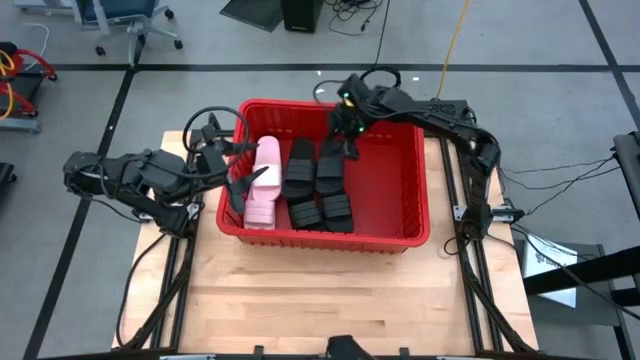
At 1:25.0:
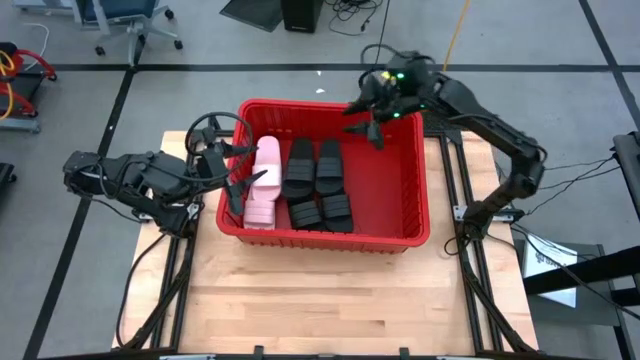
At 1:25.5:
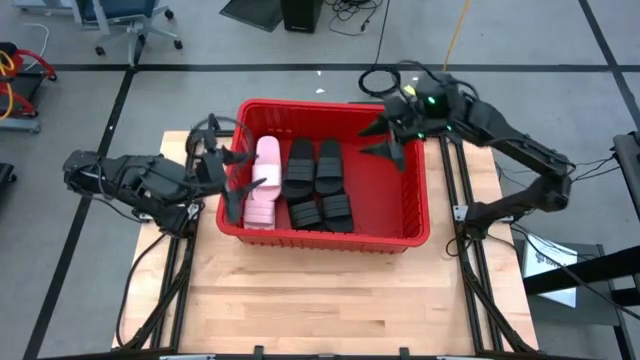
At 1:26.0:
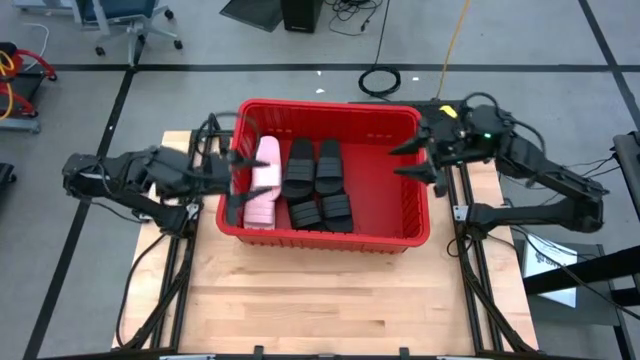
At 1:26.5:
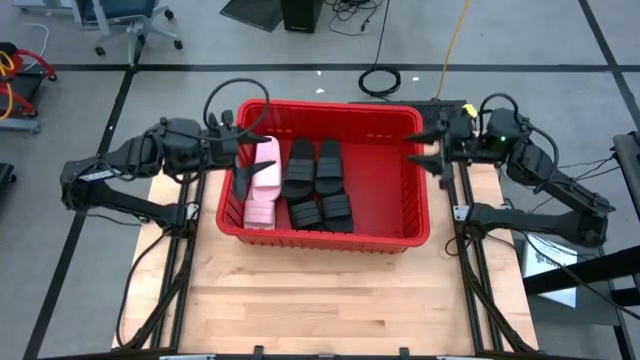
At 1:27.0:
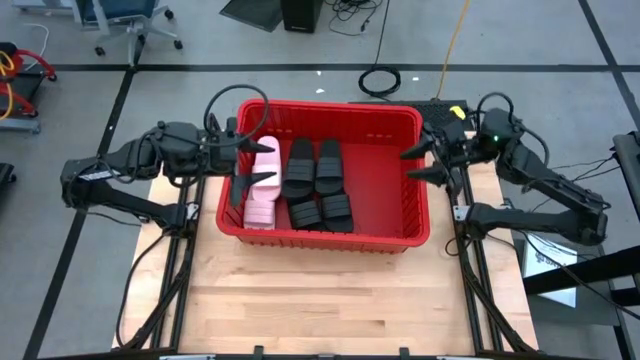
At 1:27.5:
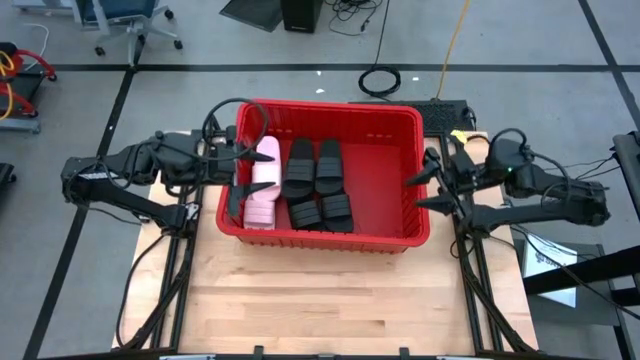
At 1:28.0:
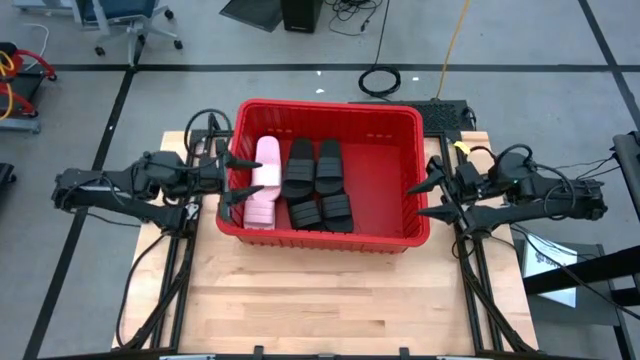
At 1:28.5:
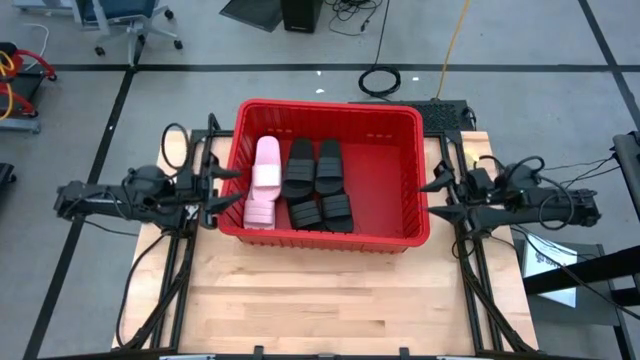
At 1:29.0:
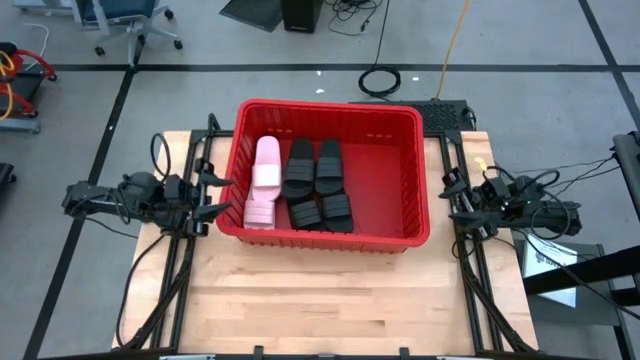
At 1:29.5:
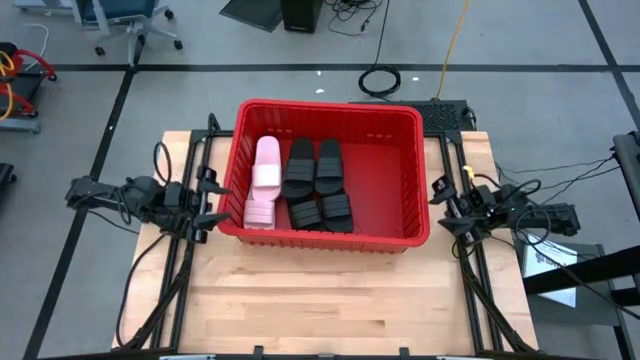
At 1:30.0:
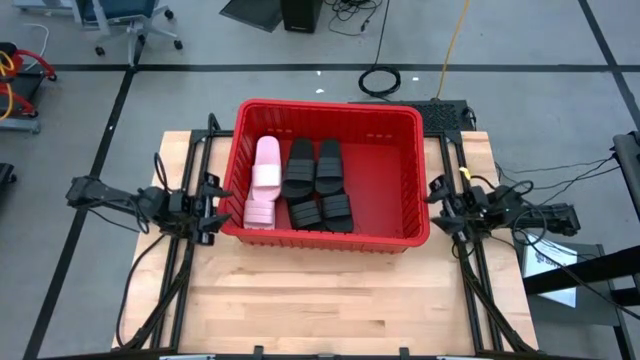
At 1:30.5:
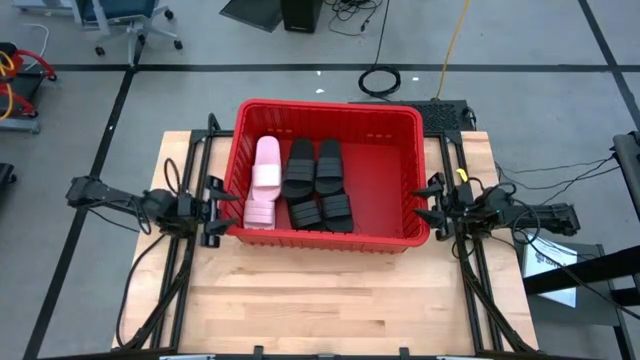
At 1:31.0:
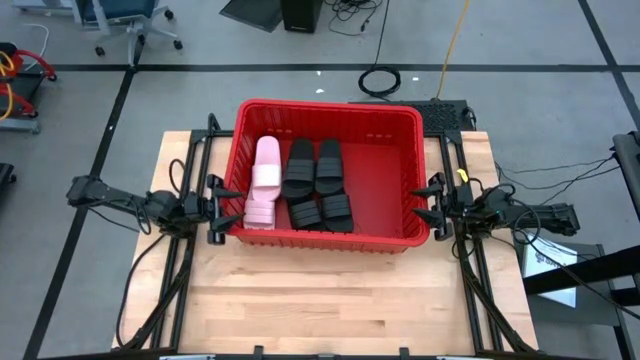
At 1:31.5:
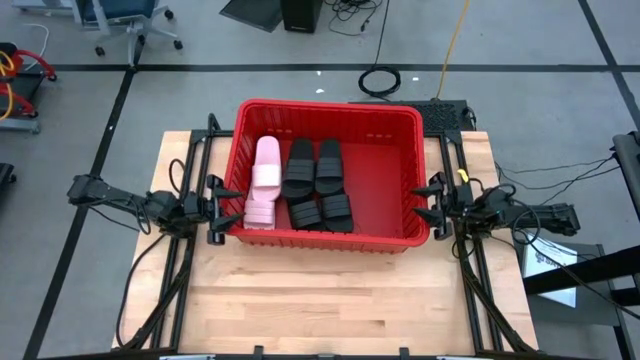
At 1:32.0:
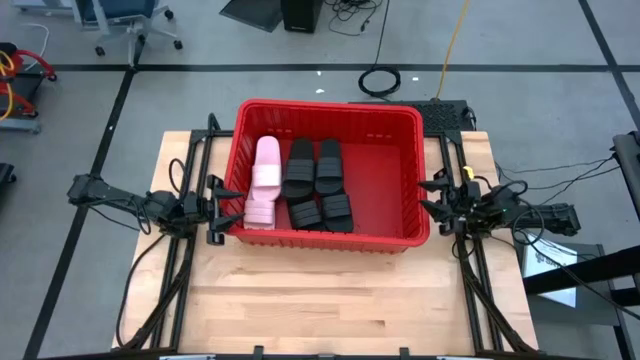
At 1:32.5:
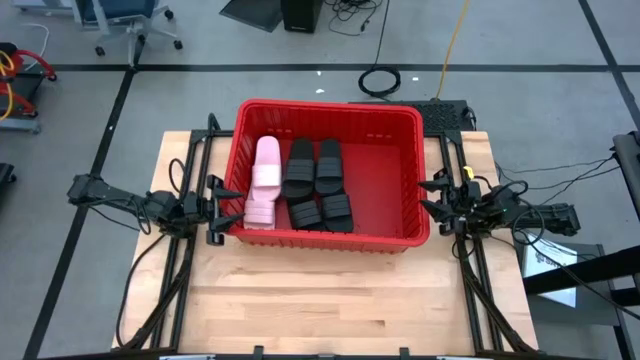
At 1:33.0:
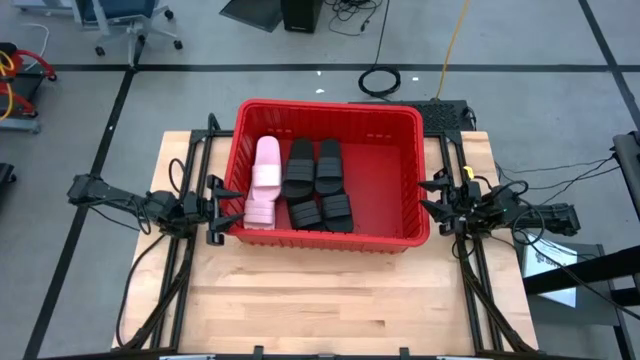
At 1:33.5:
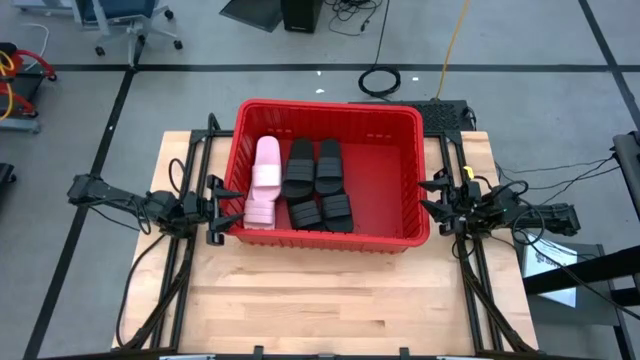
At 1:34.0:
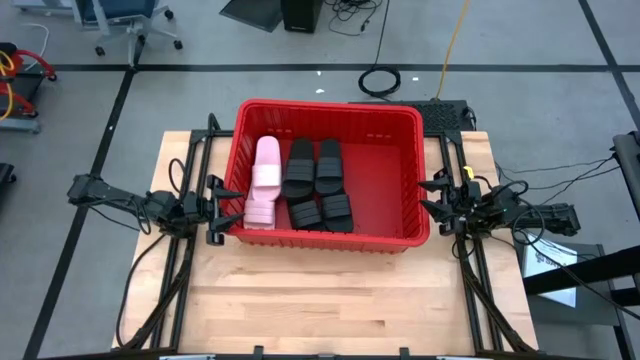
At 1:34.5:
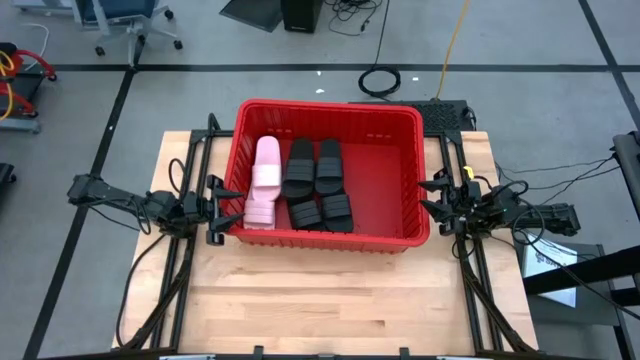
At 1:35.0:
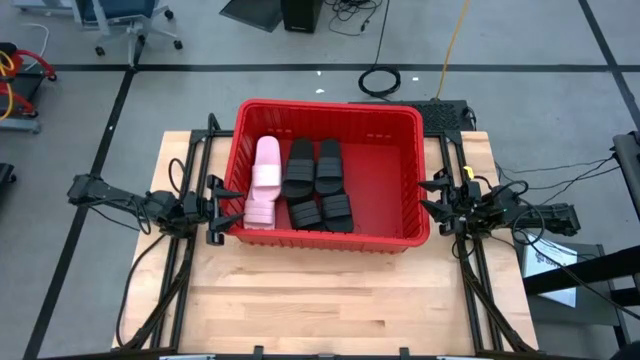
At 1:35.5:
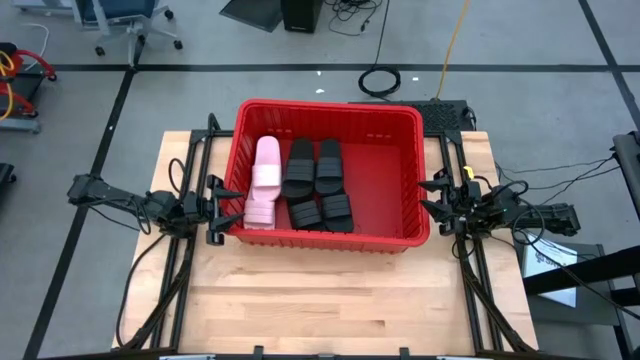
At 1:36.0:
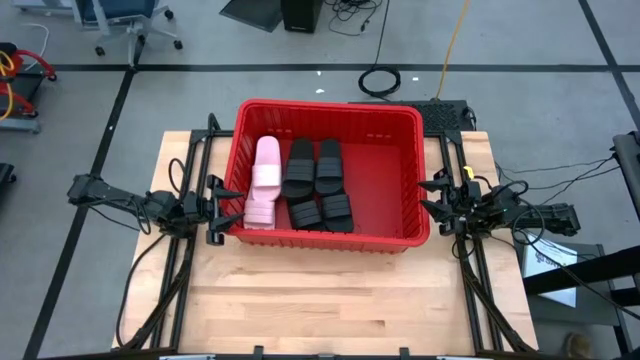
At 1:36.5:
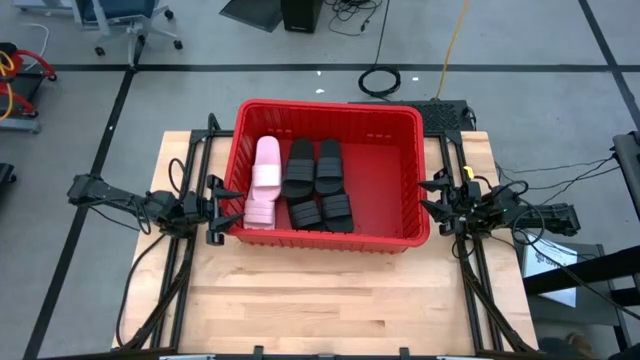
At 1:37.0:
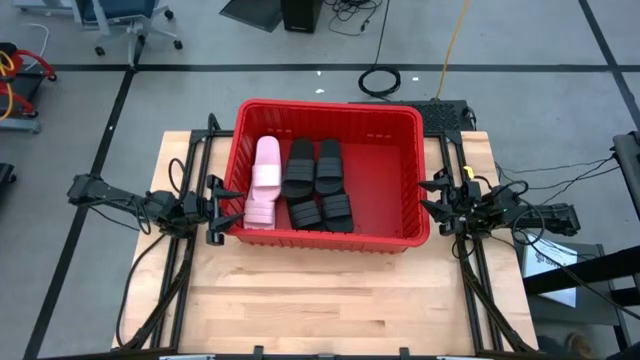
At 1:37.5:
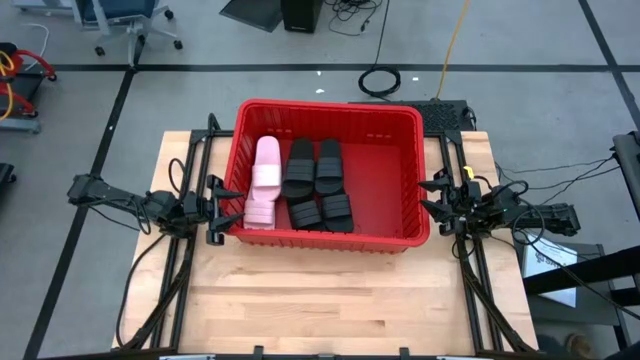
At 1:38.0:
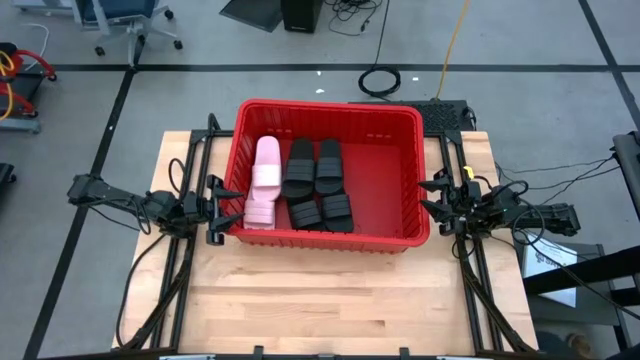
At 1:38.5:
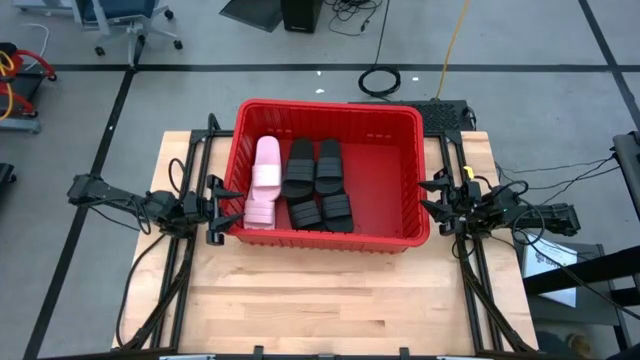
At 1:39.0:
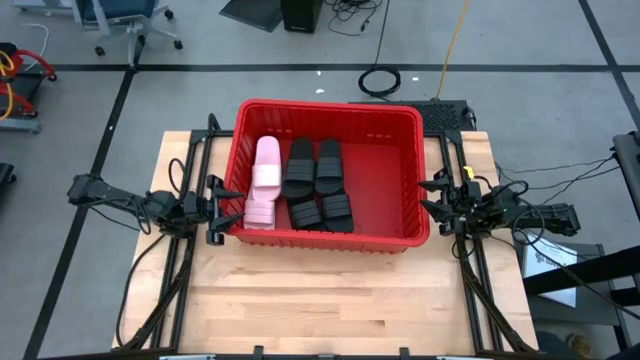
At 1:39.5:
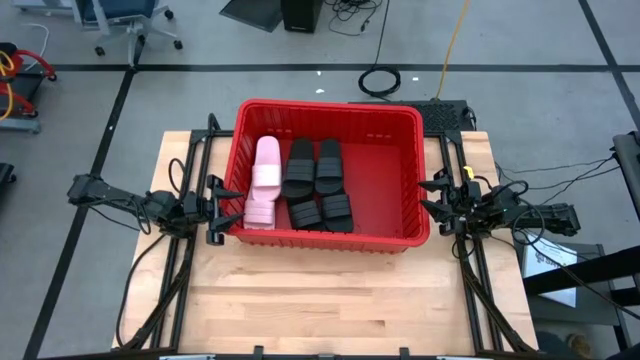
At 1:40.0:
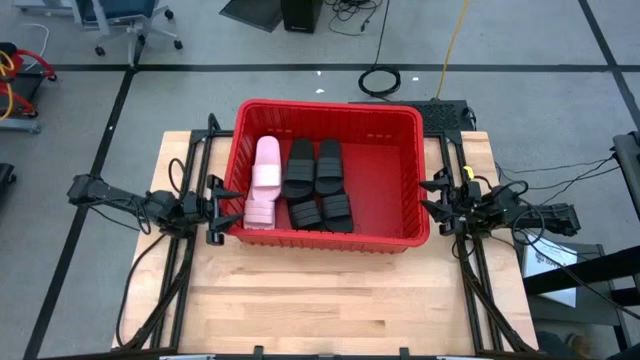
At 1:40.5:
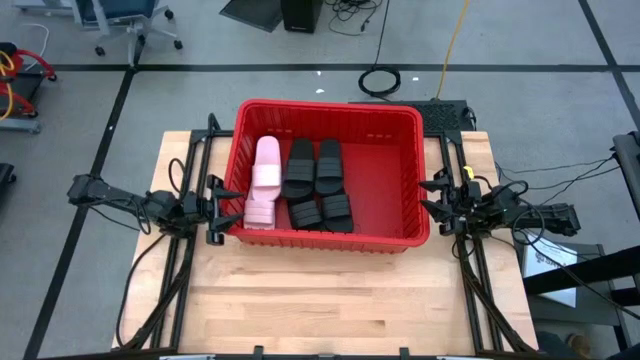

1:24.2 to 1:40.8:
Task: Pick and place slides into bin
Return to Home Position

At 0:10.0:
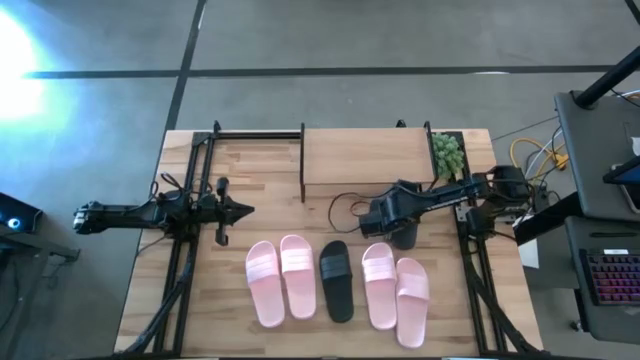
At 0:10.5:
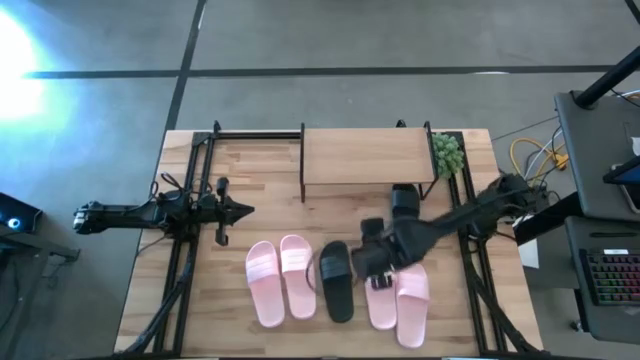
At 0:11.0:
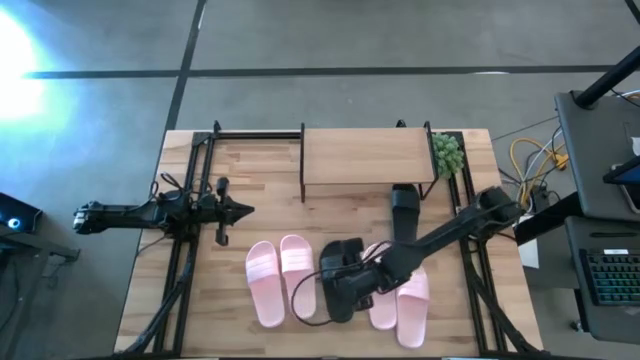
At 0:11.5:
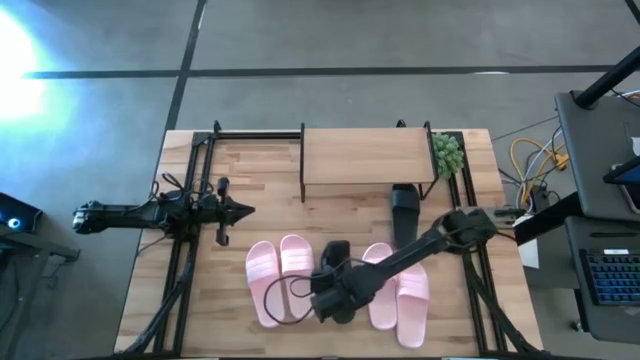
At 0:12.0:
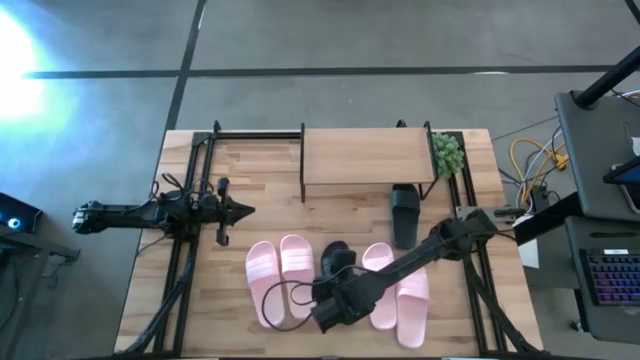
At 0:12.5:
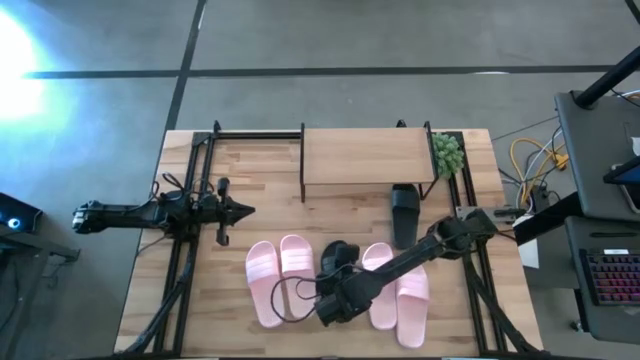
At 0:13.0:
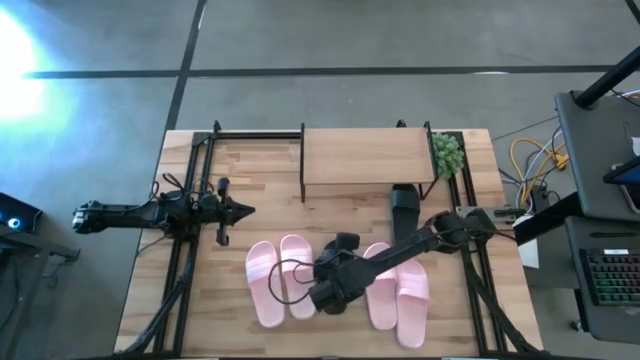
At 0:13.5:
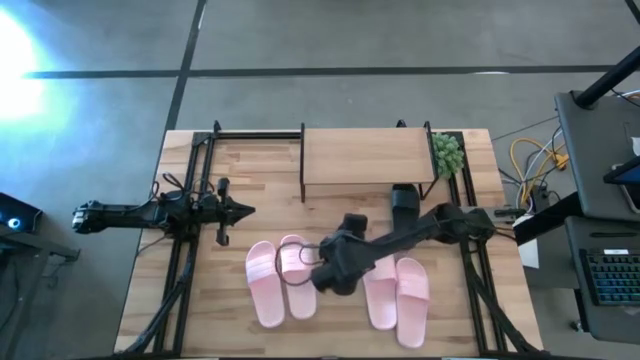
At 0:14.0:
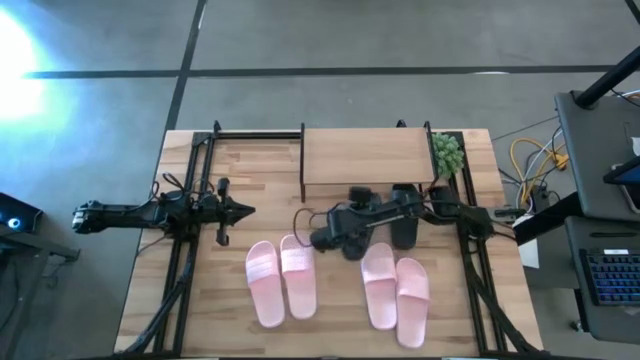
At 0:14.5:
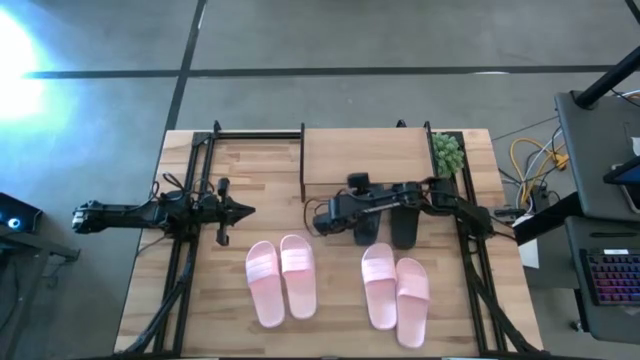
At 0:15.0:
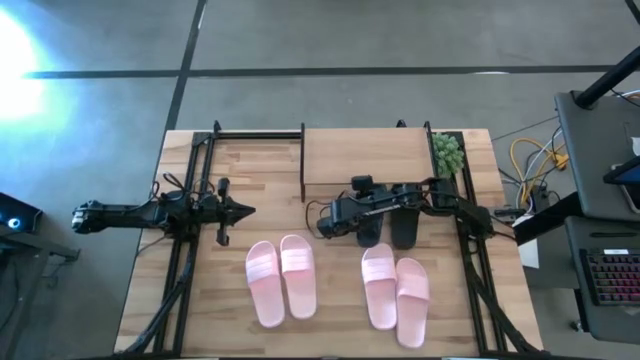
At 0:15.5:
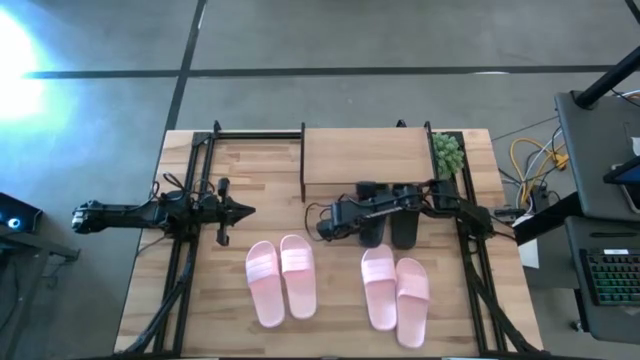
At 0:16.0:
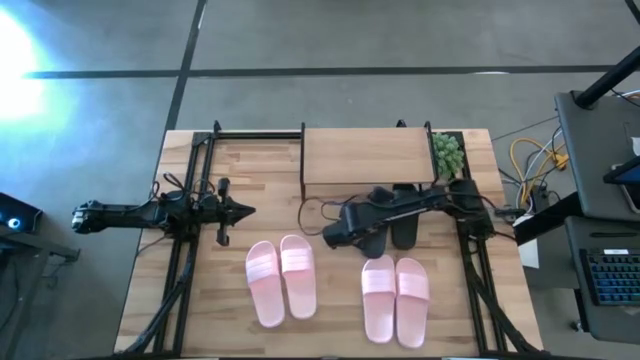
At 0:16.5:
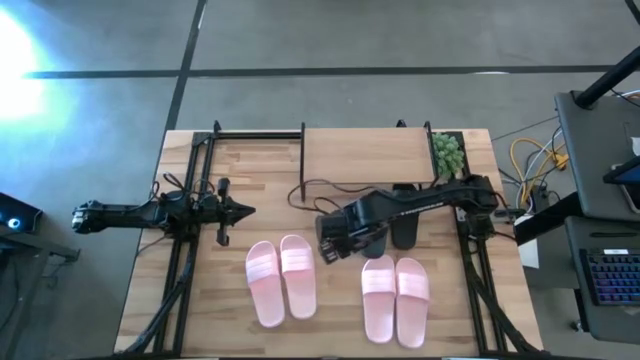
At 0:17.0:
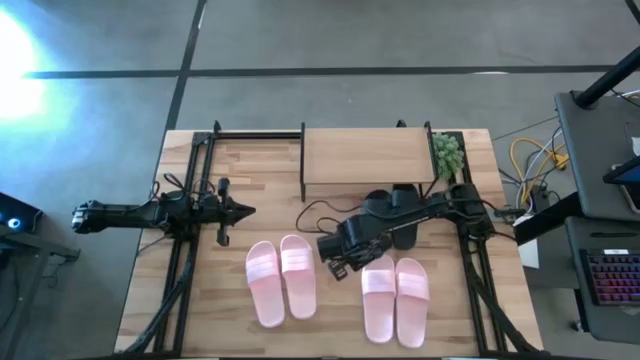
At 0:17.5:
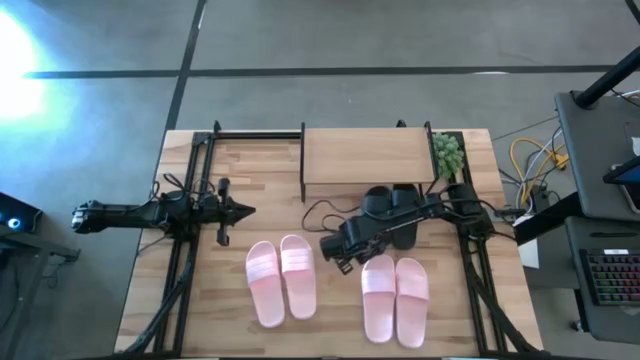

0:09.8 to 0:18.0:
Task: Pick and place slides into the shelf
Put the black slipper under the shelf
